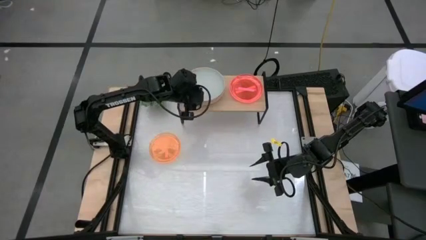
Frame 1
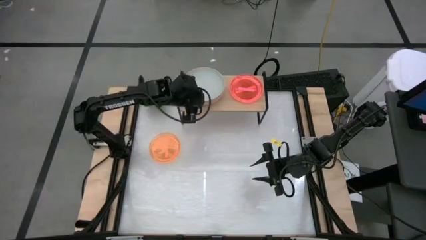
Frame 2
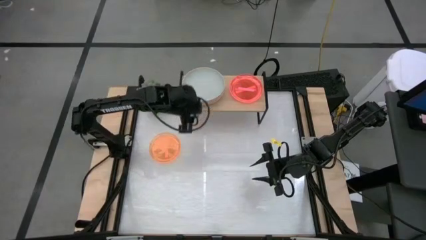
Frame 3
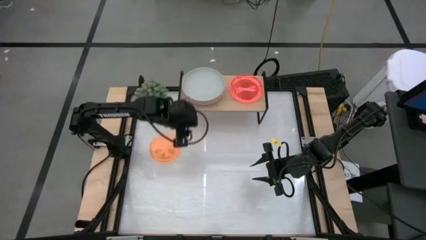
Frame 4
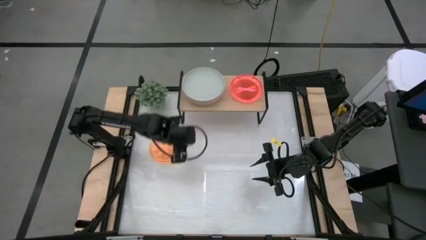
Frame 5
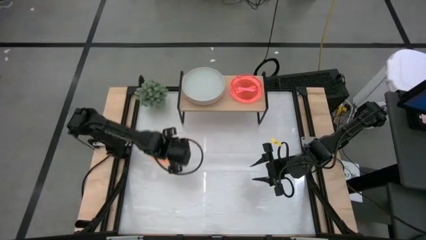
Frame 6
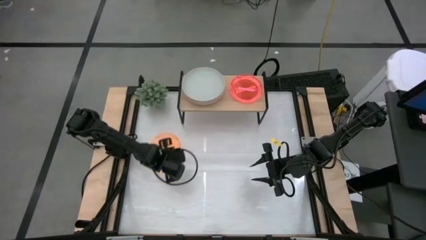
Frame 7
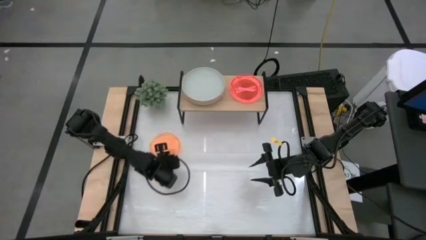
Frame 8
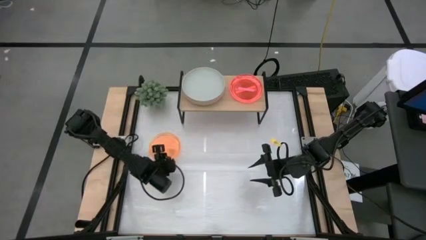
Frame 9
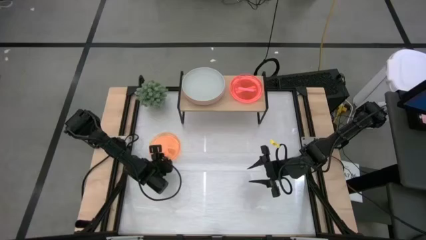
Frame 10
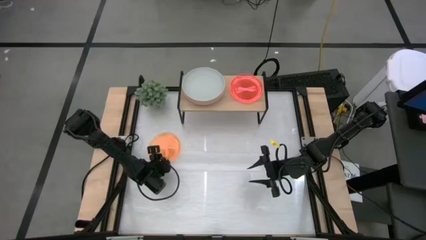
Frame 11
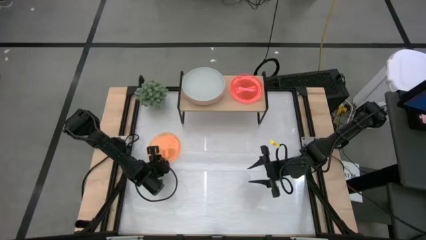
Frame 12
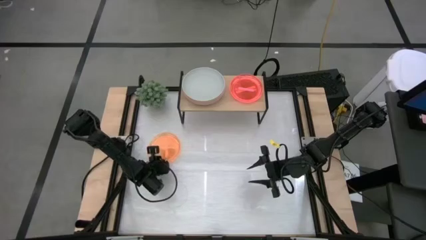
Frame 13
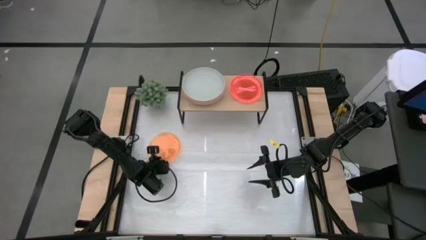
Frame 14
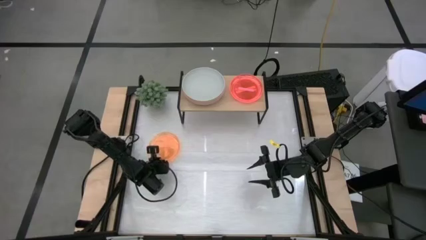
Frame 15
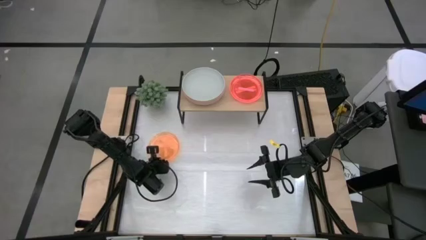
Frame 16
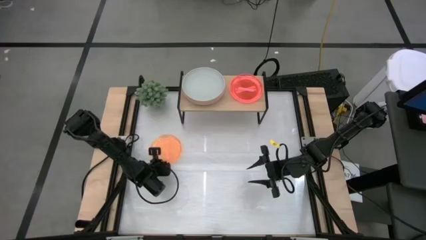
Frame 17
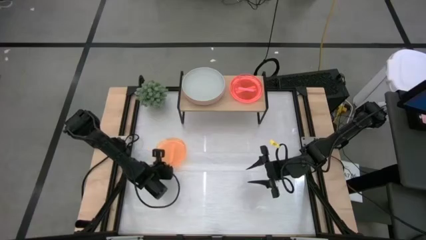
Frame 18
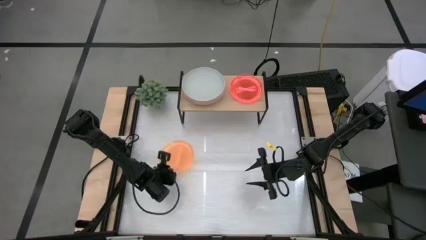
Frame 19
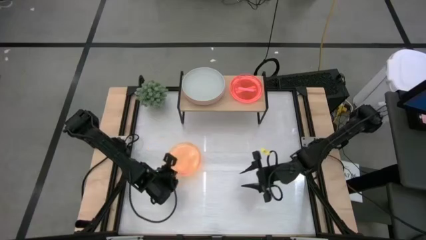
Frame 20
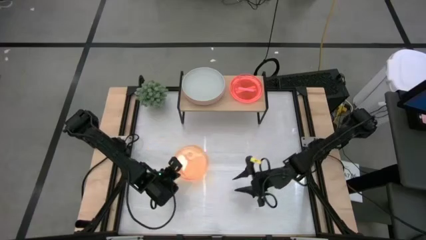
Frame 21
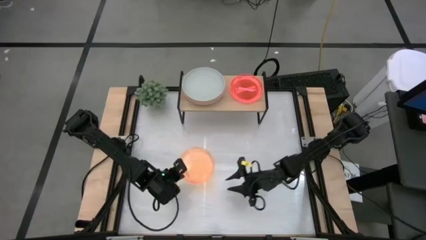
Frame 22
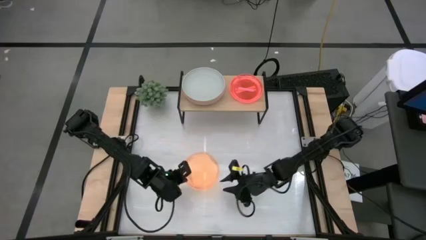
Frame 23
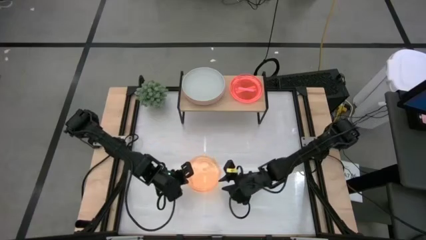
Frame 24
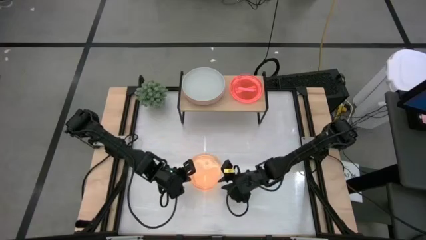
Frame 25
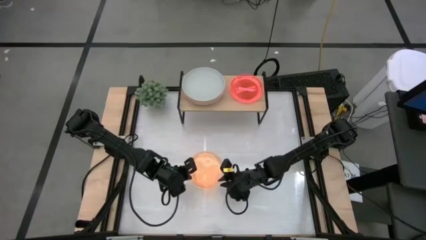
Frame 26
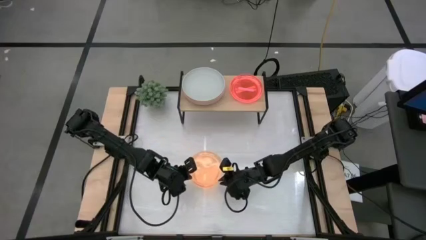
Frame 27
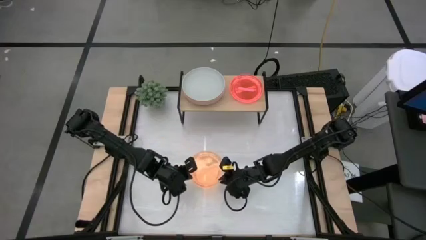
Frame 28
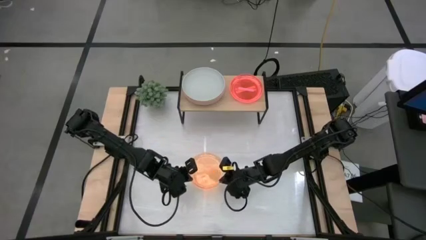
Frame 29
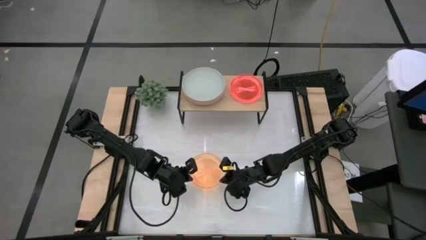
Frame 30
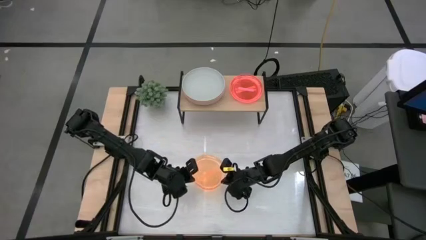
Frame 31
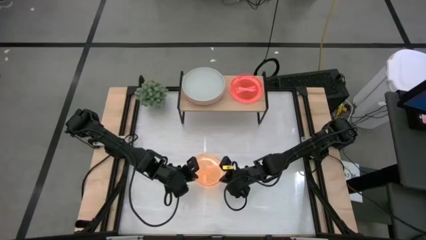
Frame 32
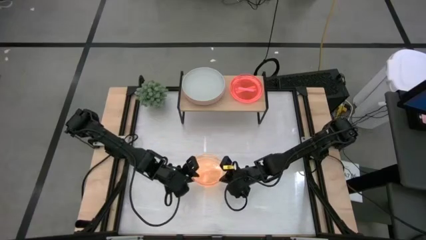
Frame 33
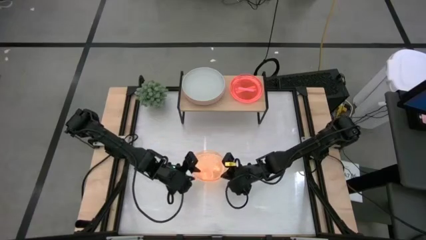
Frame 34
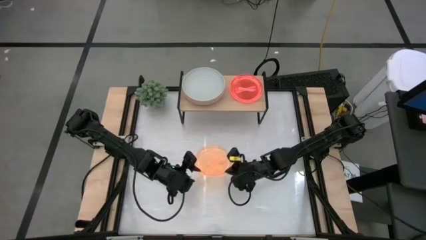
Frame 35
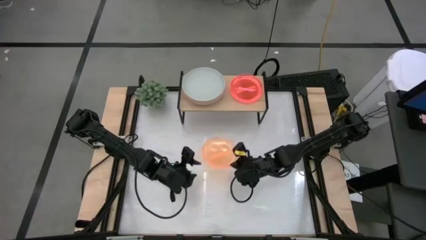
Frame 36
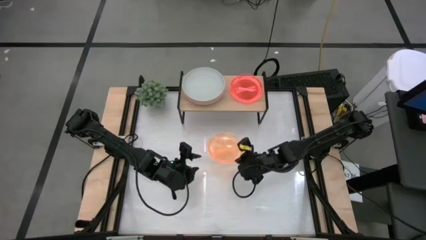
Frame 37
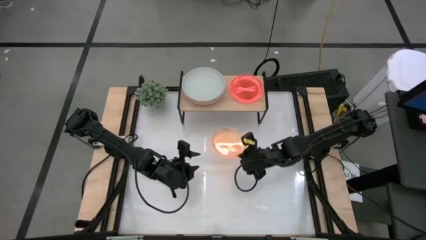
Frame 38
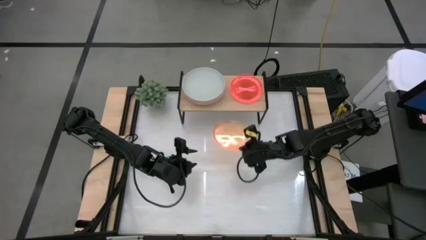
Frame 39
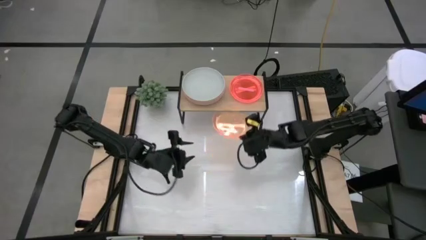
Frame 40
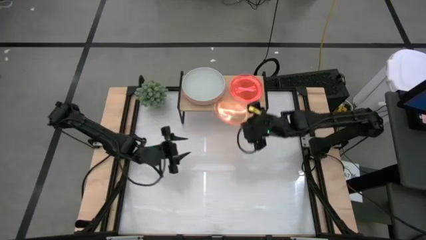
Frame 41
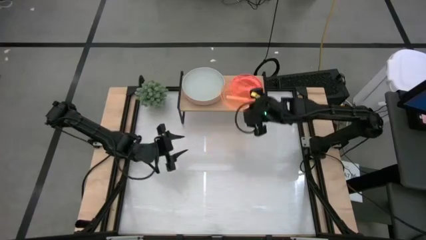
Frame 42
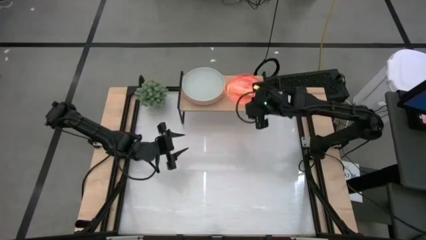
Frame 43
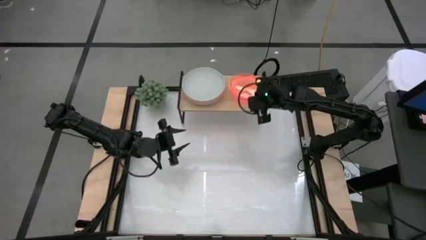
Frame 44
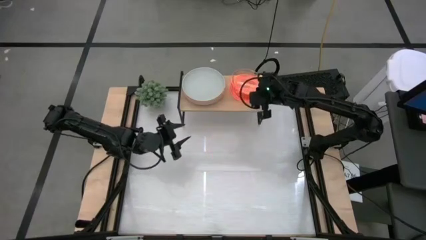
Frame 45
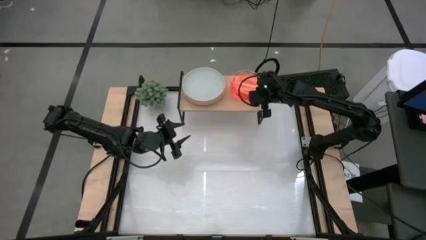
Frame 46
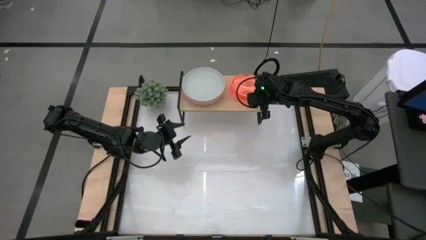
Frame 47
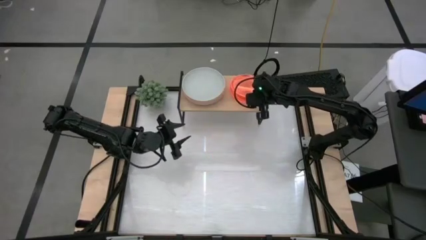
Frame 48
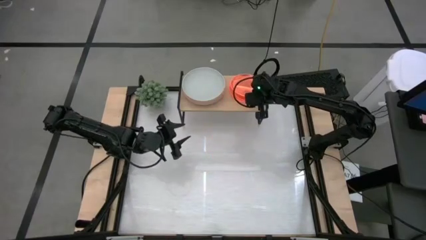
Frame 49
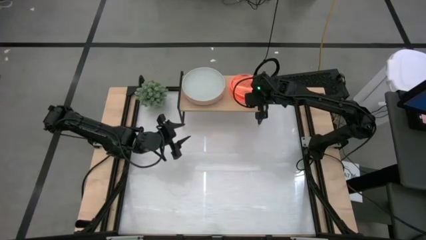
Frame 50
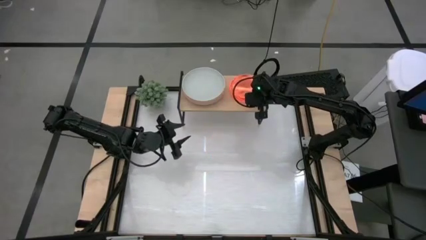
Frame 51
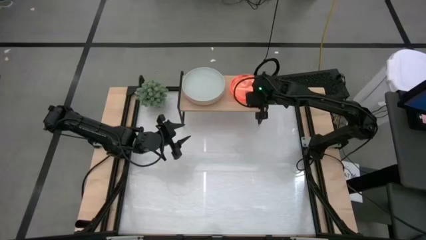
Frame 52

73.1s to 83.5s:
Task: Place and stack plates onto a shelf
Stack the orange transparent plate on the pink transparent plate

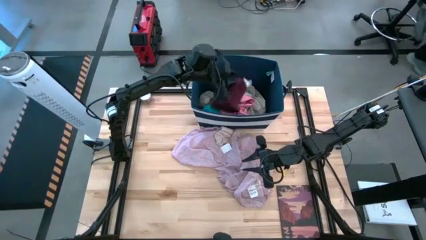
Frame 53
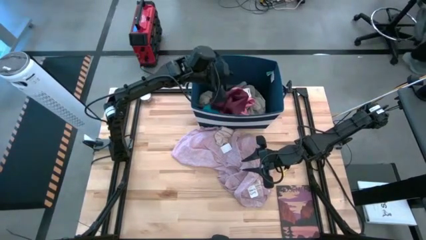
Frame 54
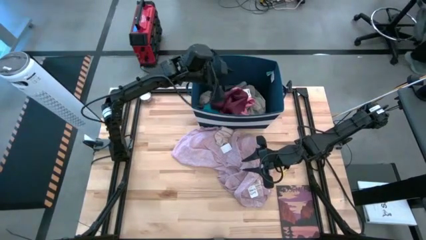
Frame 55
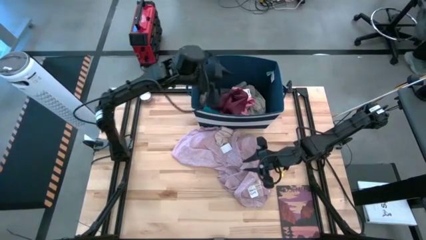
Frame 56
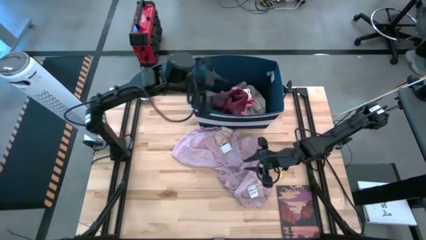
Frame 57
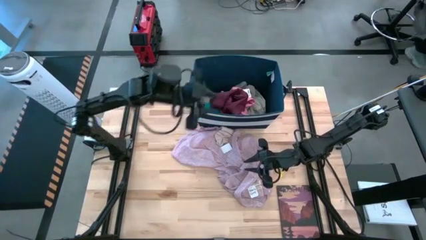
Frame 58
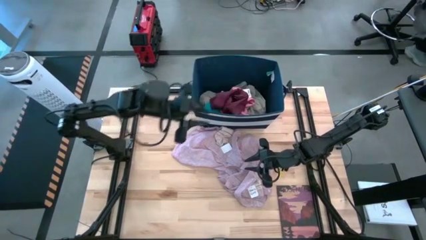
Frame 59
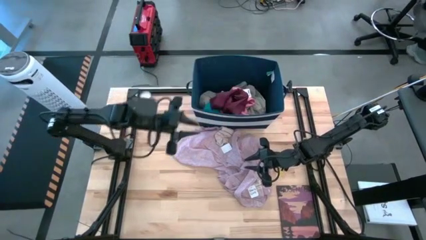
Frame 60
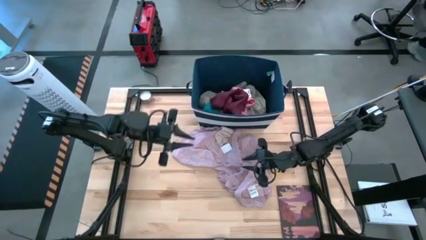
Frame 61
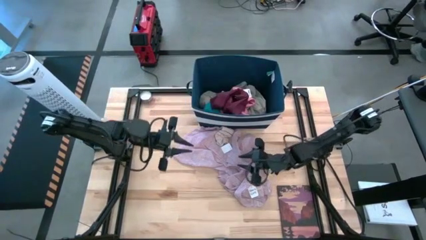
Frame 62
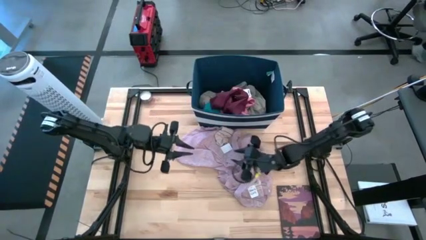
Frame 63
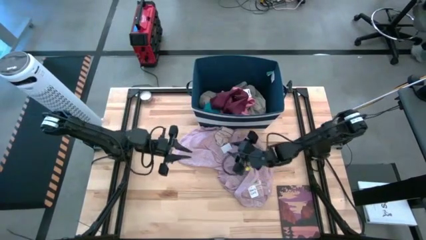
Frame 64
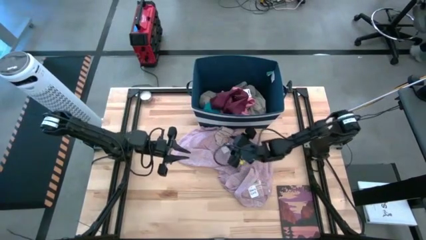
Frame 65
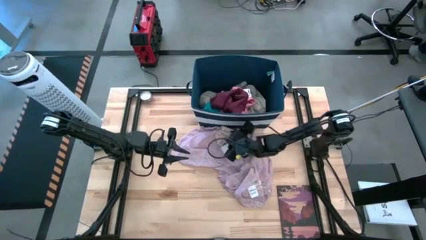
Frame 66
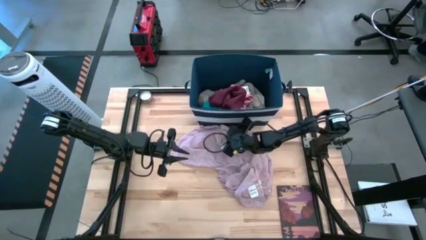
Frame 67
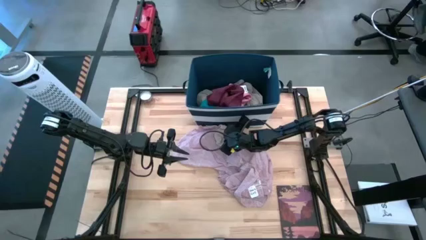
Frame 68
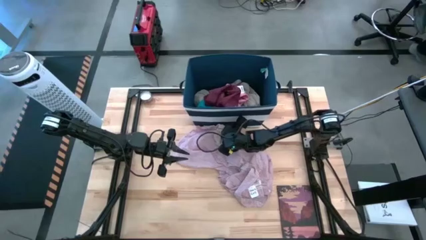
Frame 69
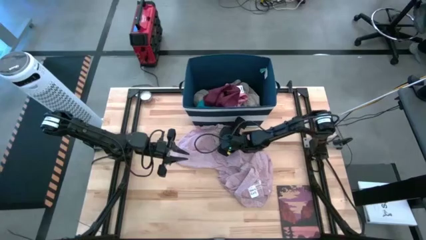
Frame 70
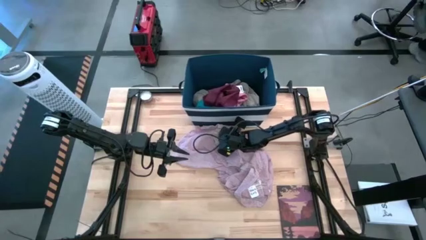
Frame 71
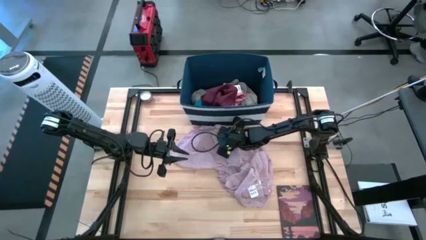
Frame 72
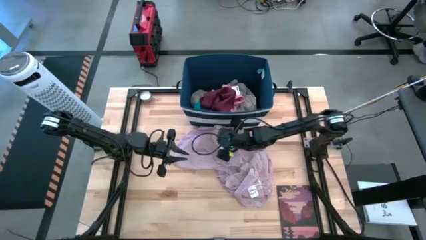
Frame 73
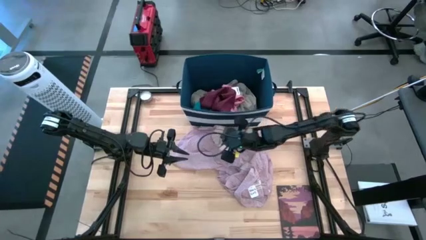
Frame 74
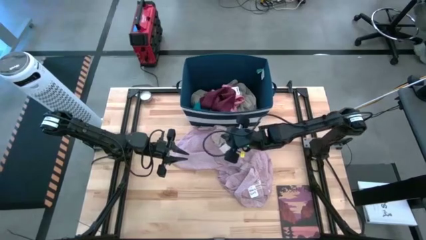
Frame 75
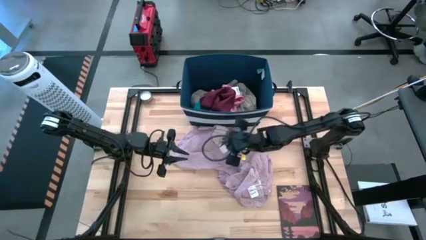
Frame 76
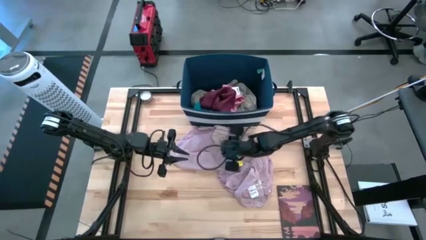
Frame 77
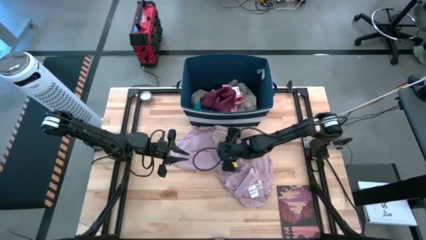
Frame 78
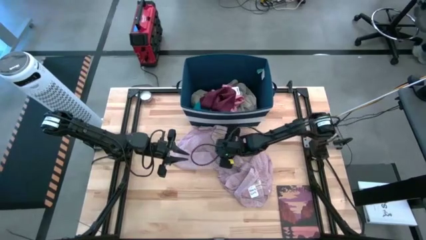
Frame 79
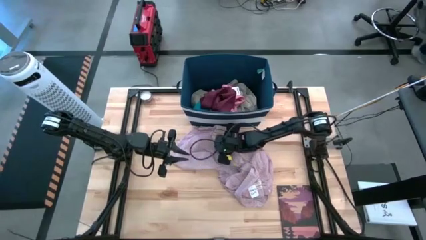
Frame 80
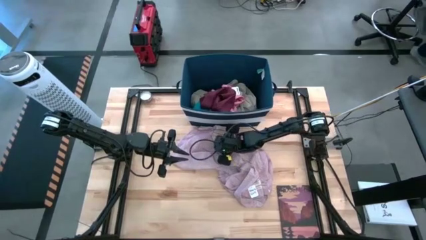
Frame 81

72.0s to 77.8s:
Task: Sort clothes
Put the striped sock into the blue laundry organizer

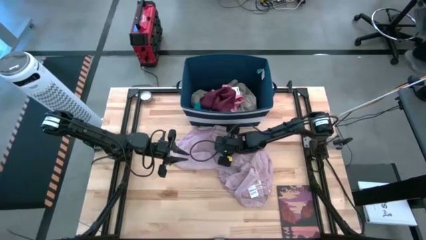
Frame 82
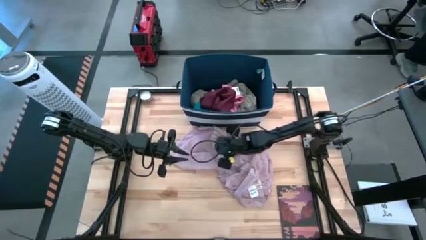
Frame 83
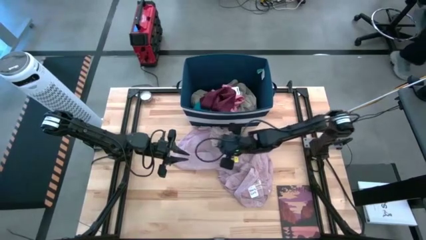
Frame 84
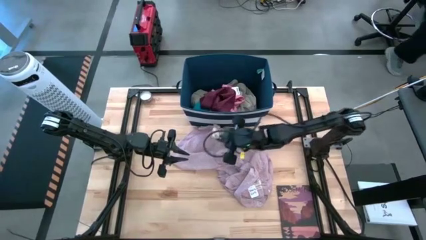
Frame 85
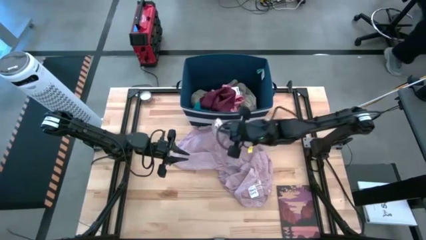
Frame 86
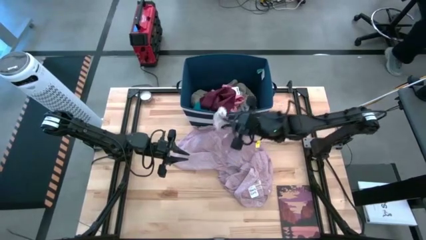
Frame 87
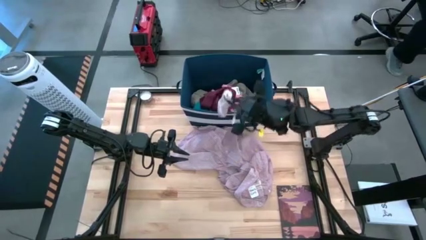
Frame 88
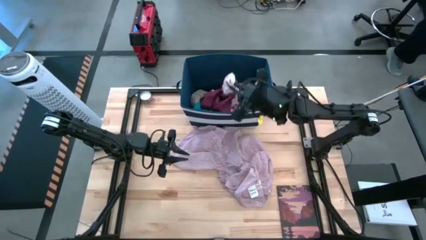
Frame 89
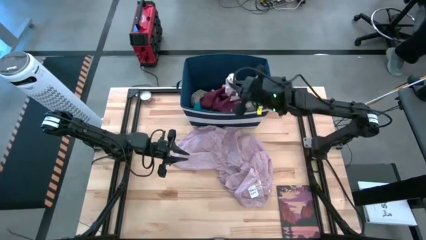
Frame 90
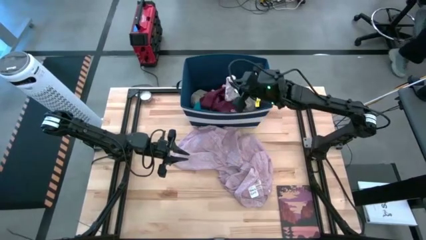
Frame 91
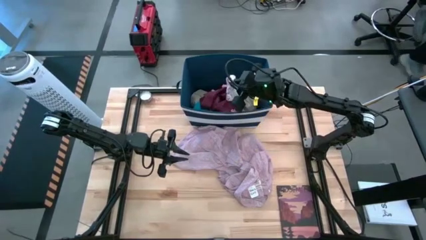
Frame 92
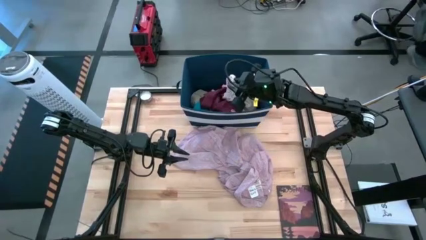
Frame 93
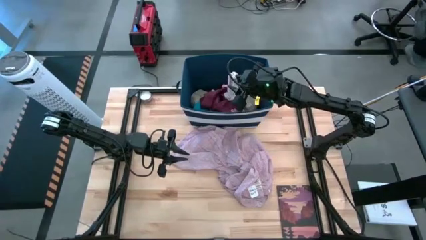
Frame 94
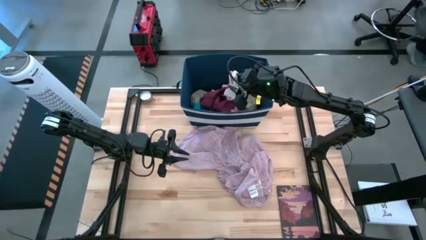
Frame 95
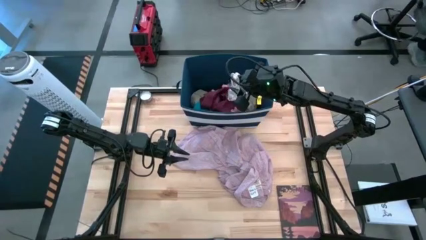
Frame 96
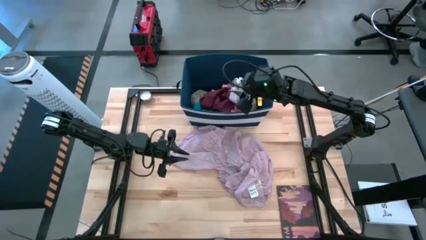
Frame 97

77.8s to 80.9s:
Put the striped sock into the blue laundry organizer
